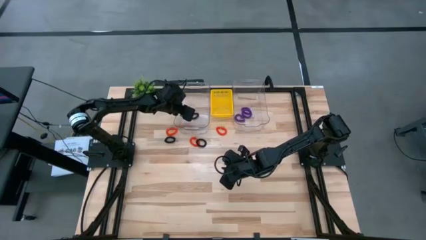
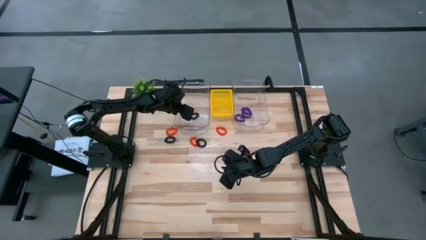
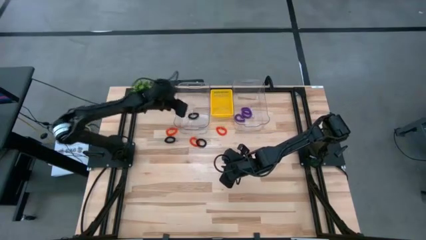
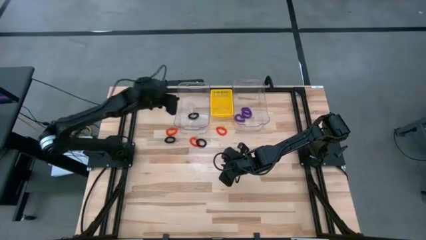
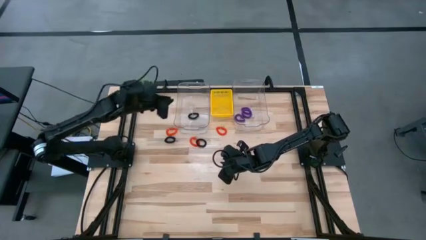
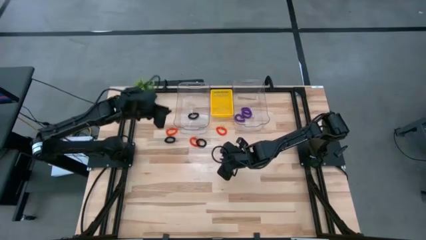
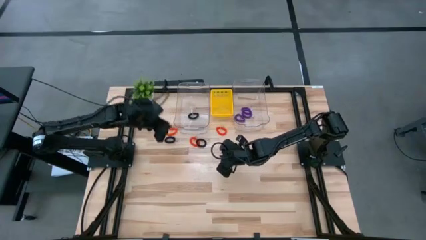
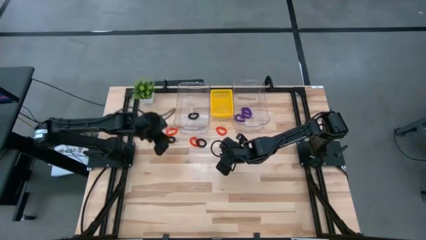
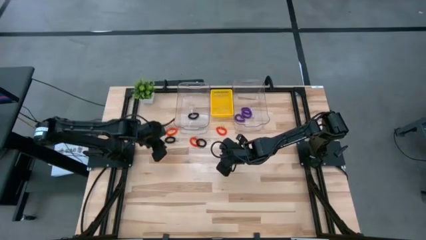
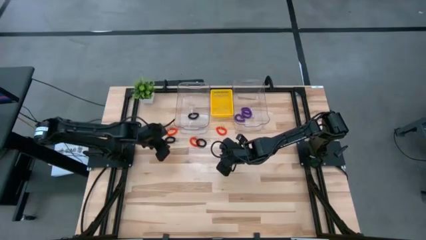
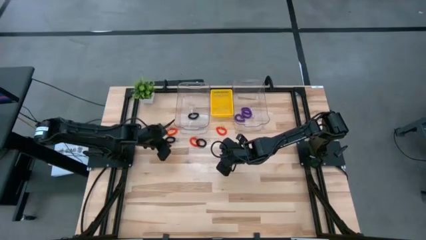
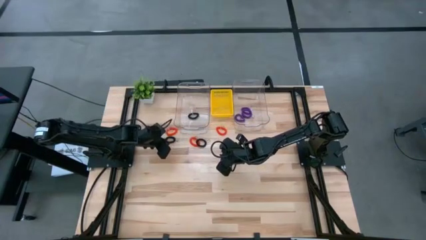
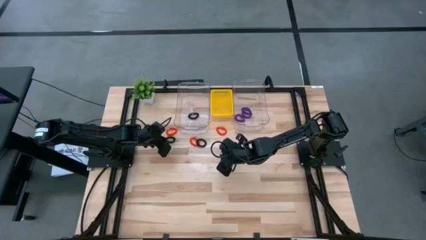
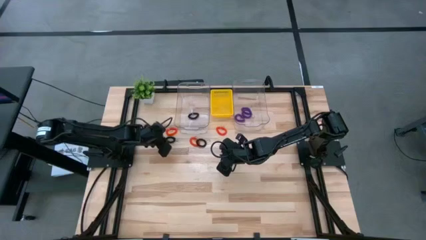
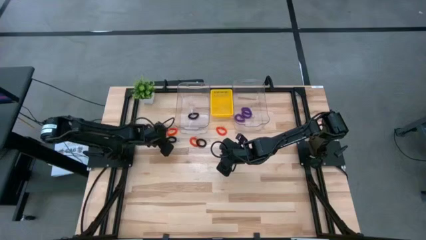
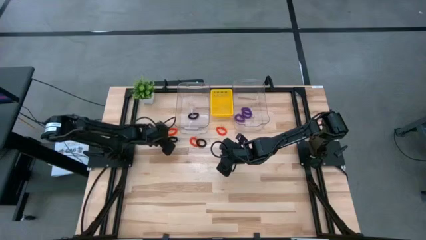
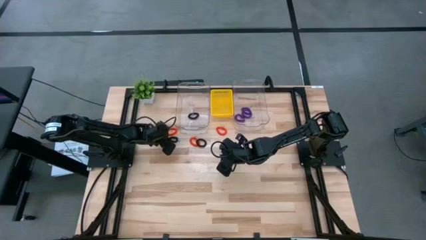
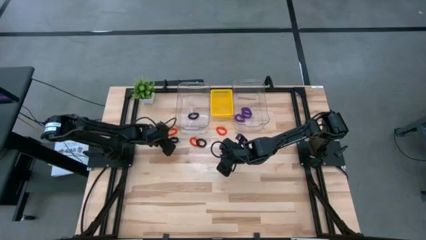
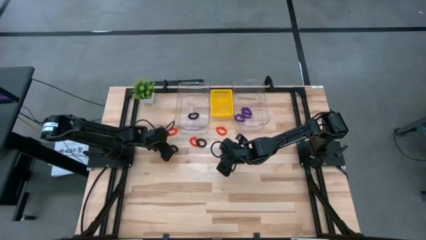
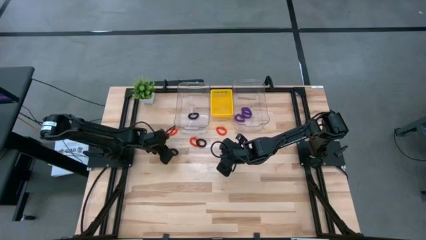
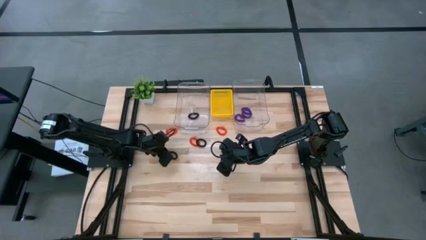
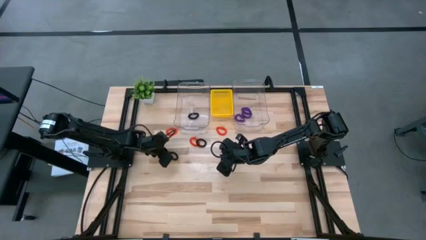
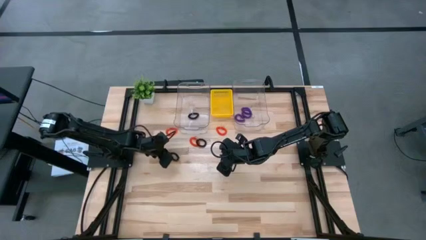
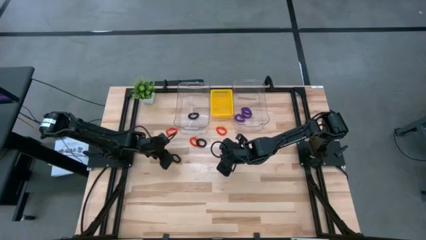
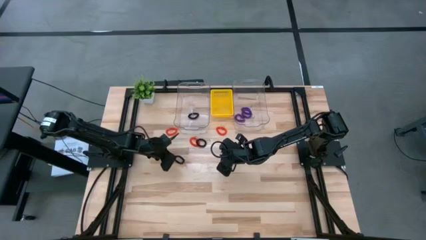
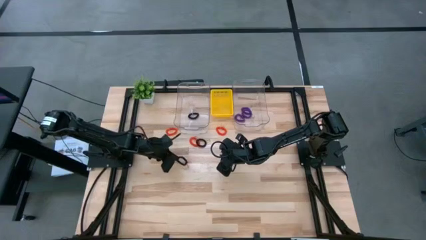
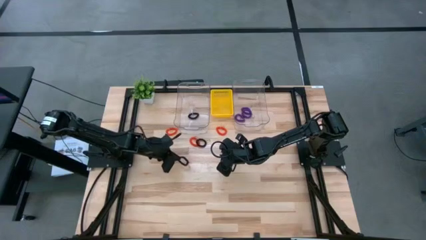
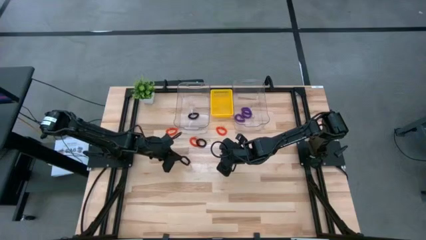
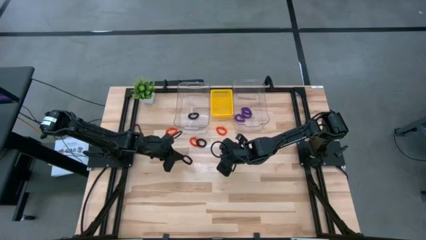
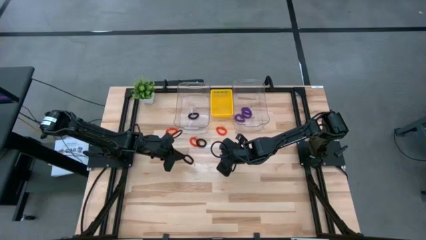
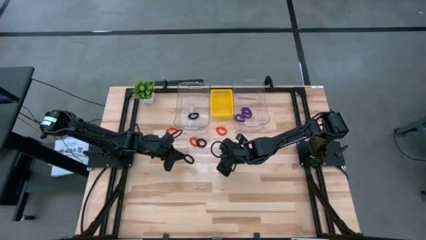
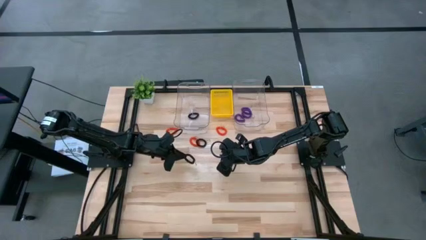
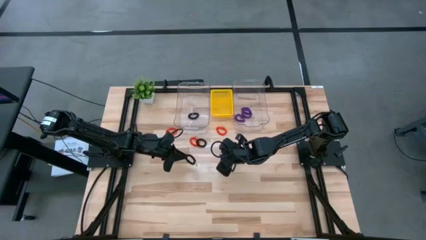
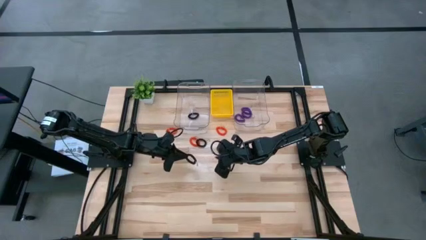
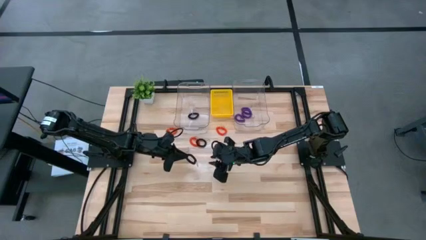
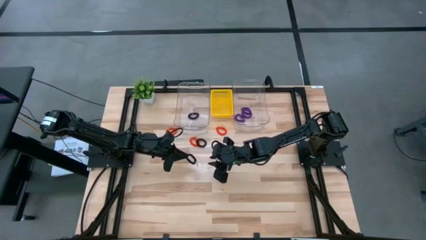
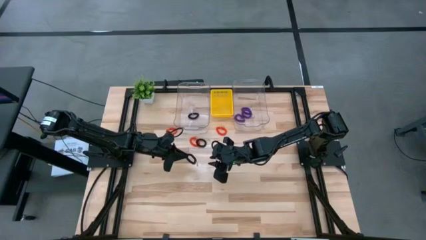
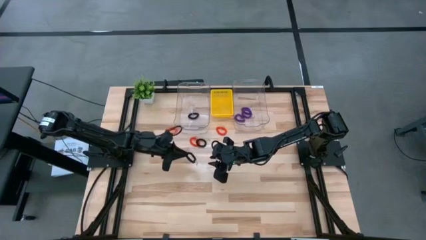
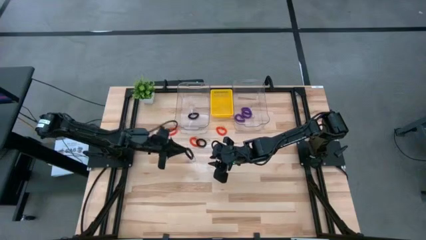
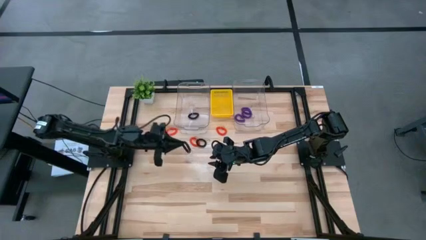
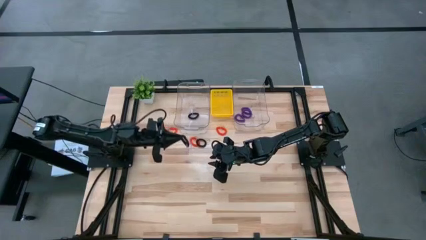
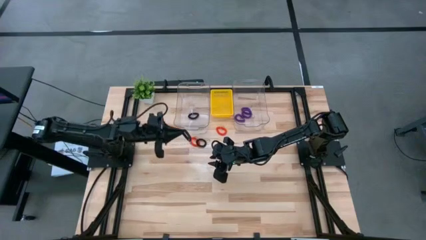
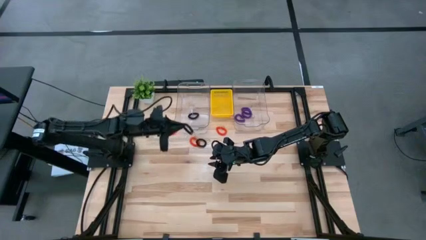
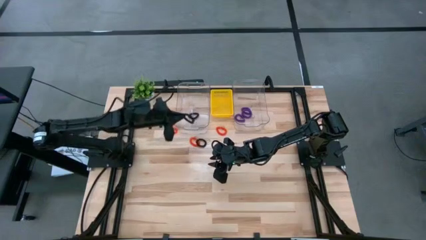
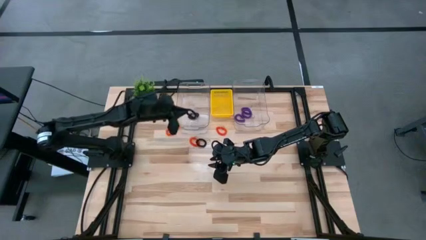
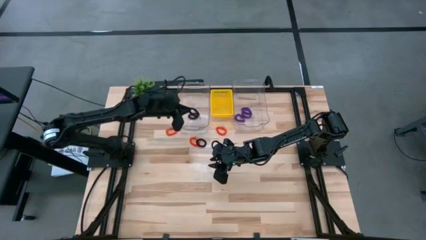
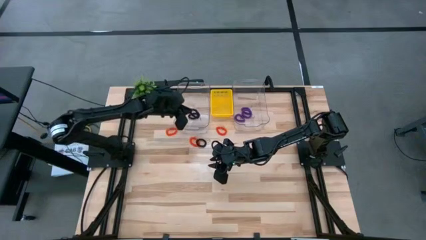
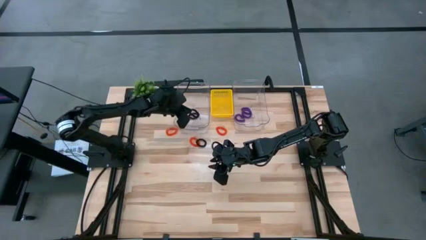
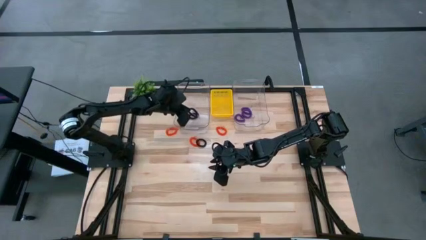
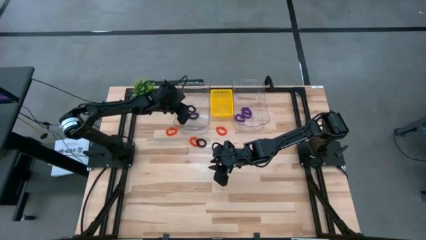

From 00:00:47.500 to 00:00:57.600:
Task: Sort spring keychains
Put the left black spring keychain into the left transparent bin

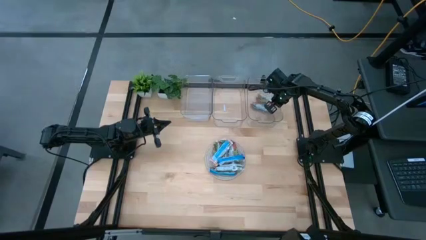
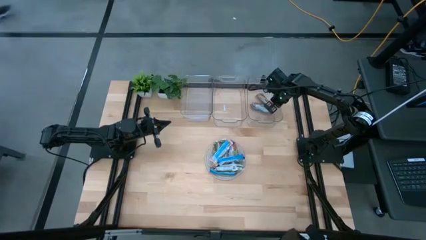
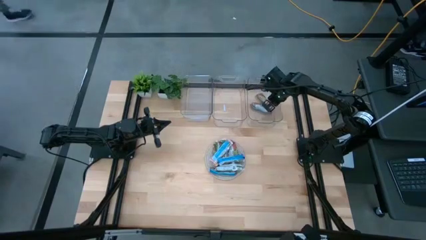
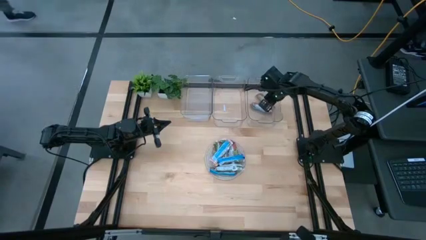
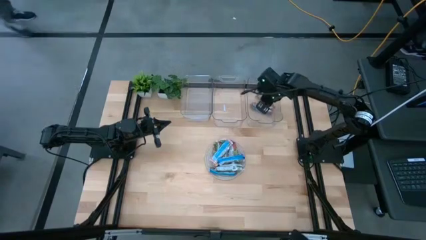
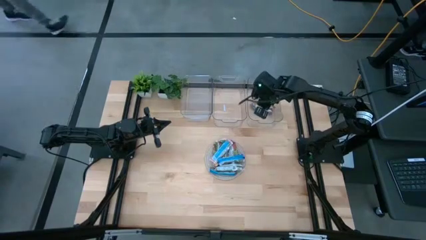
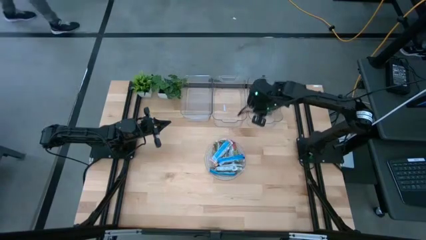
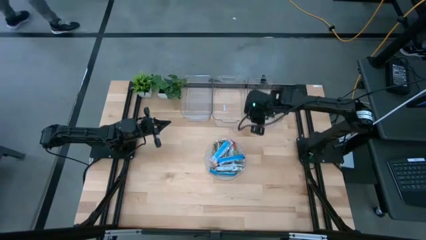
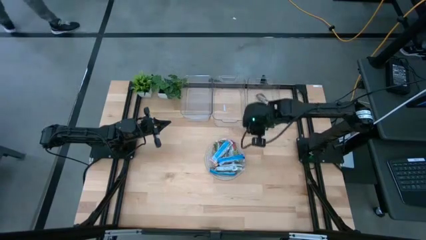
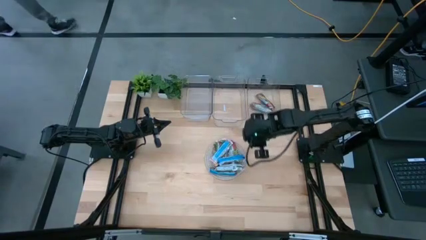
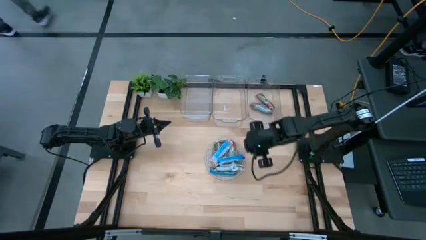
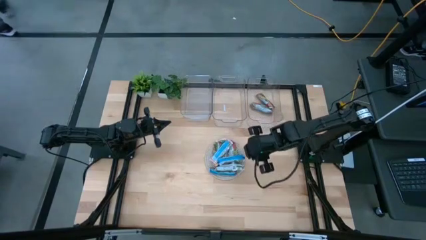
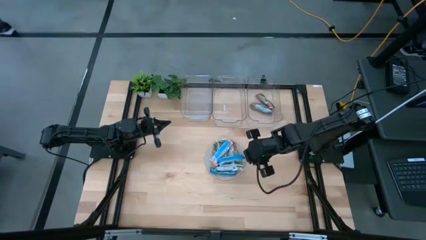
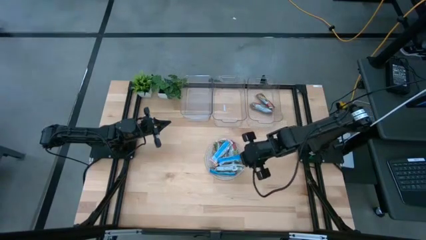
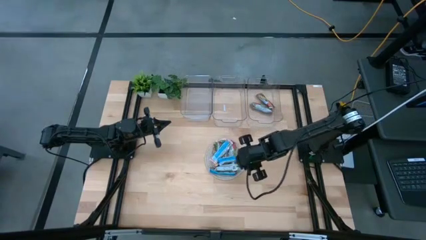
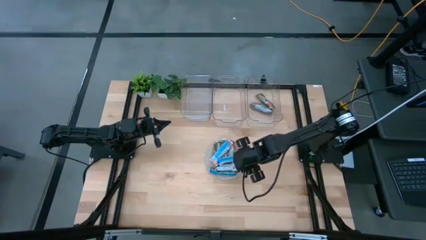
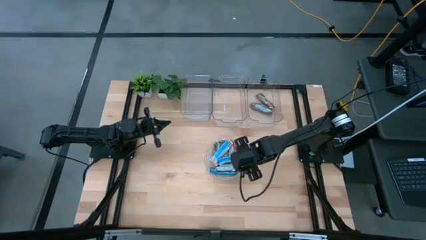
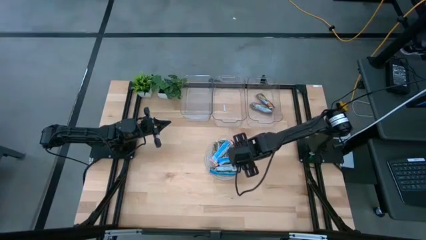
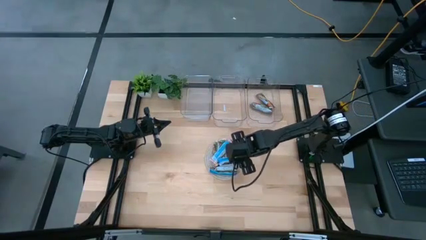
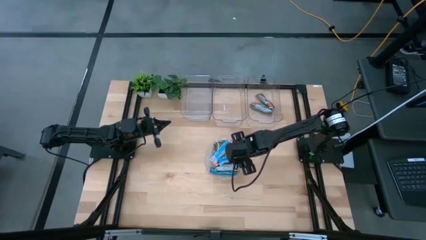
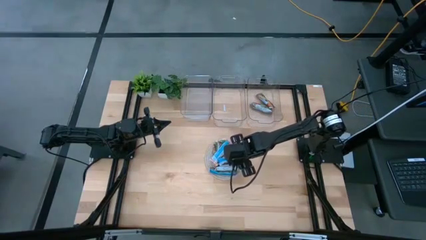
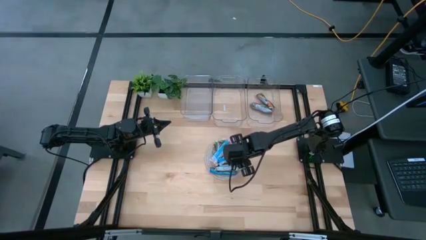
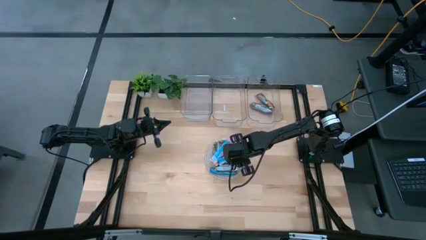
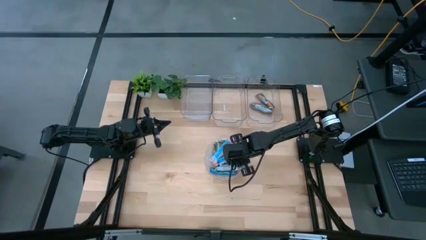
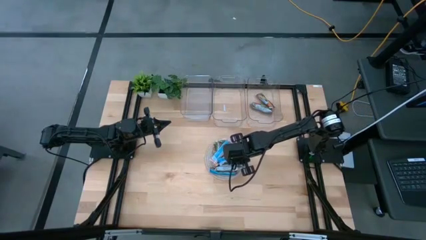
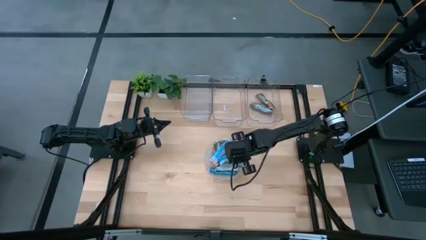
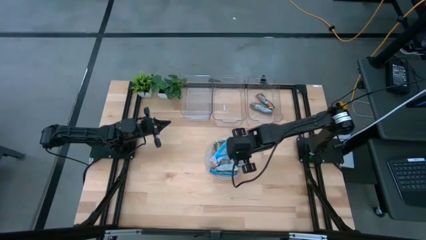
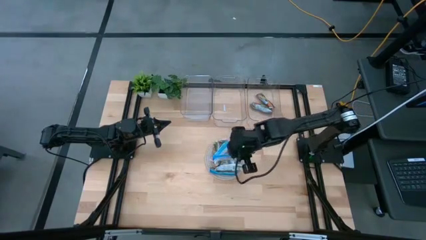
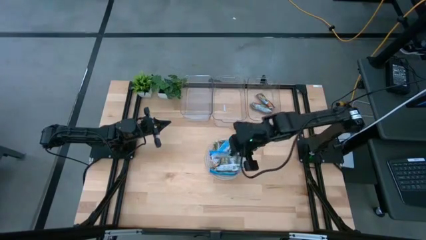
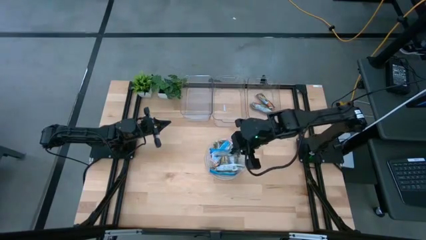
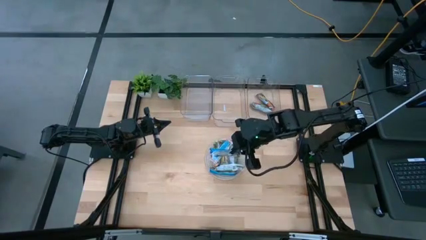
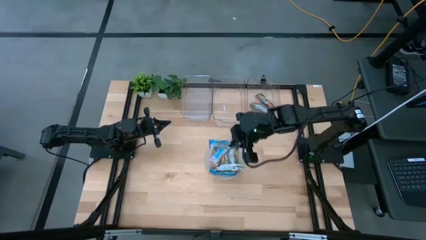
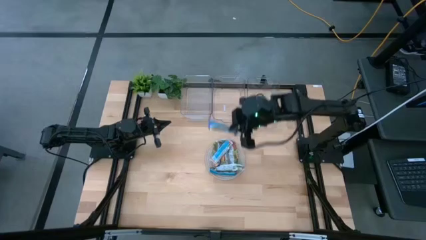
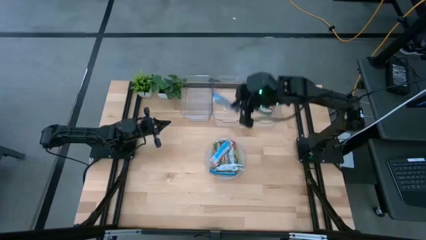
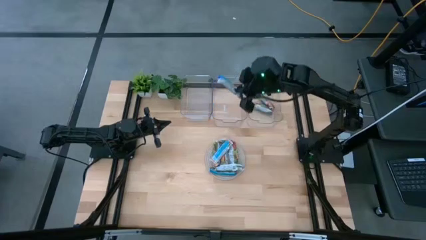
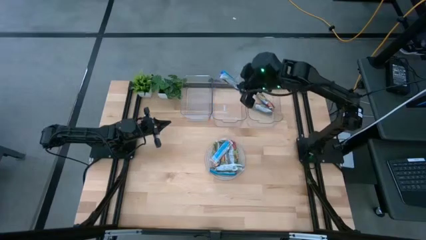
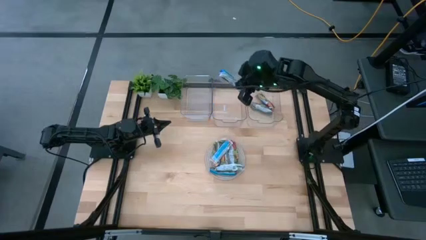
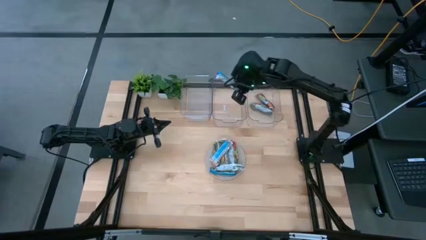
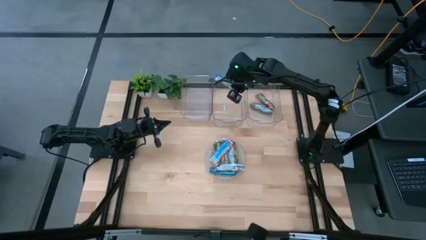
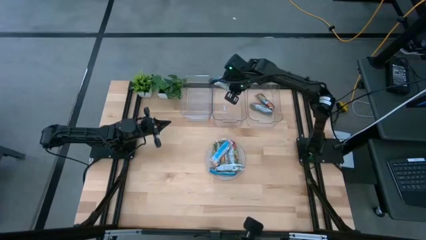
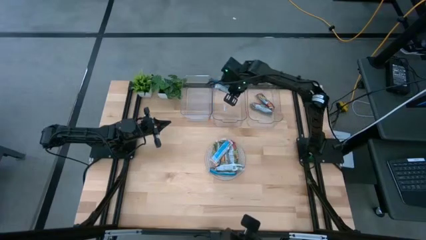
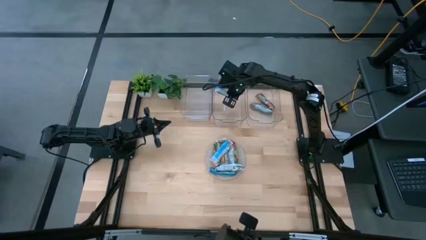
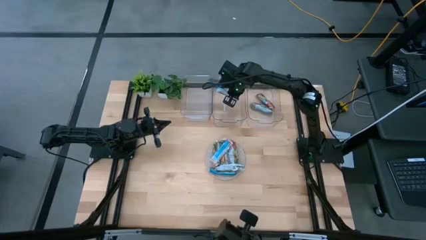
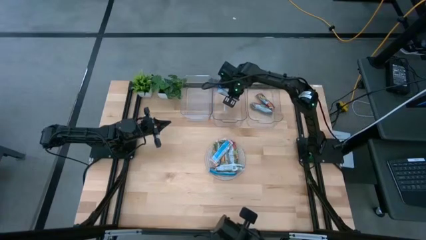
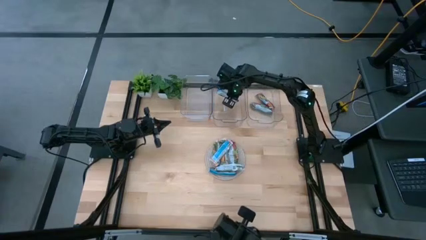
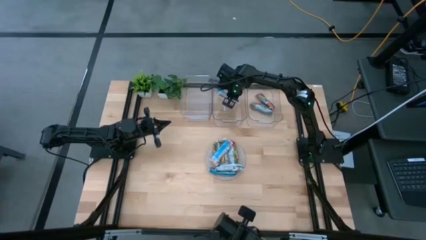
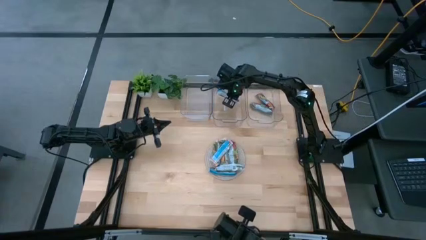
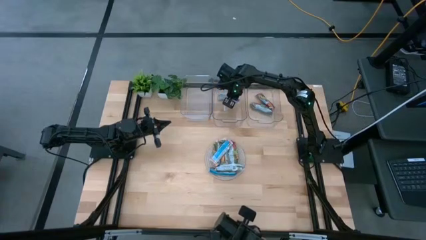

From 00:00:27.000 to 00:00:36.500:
Task: Pick and place Granola Bars by type
Put the blue granola bar into the middle transparent bin
